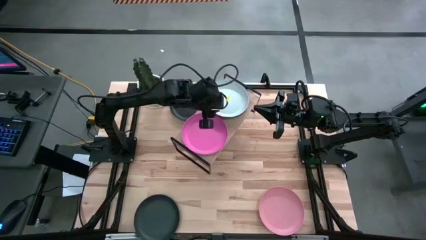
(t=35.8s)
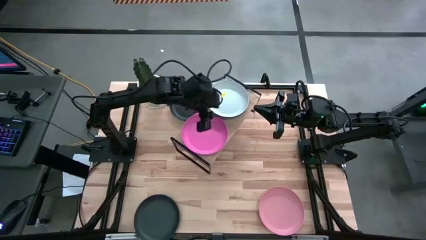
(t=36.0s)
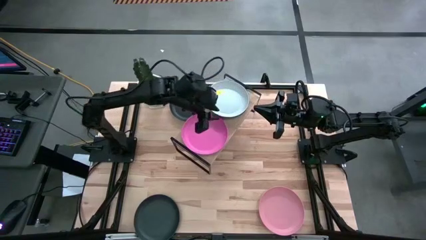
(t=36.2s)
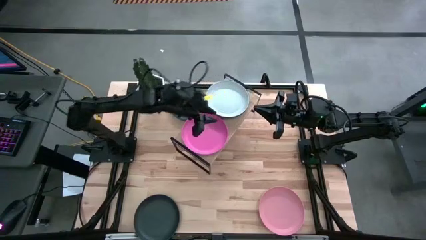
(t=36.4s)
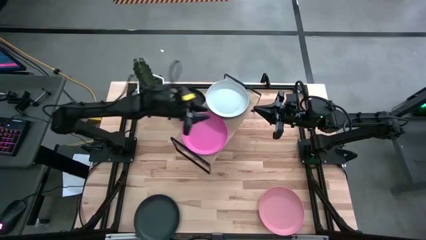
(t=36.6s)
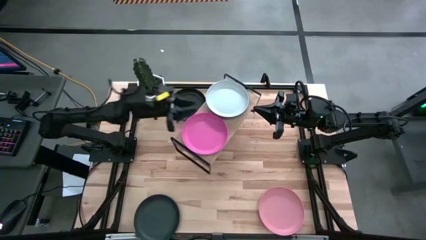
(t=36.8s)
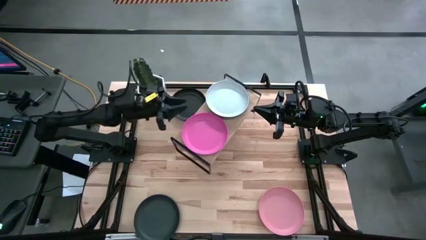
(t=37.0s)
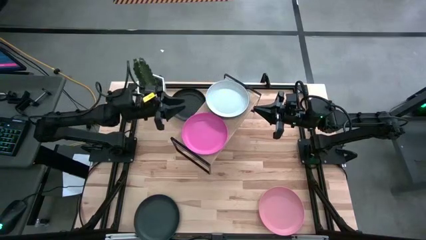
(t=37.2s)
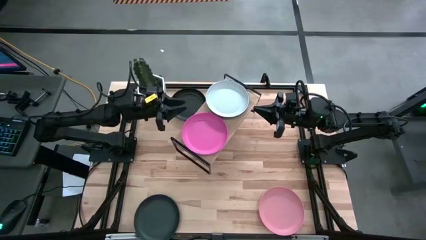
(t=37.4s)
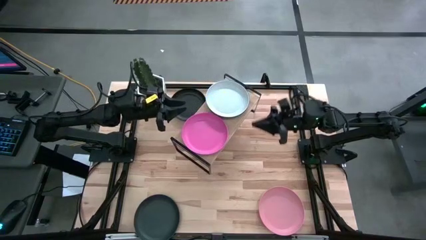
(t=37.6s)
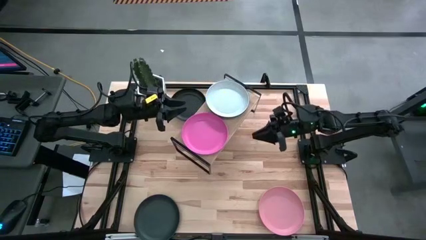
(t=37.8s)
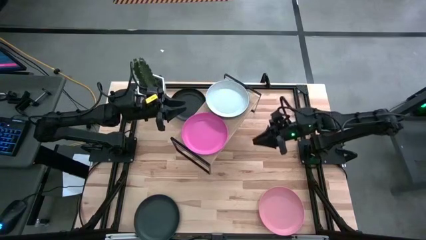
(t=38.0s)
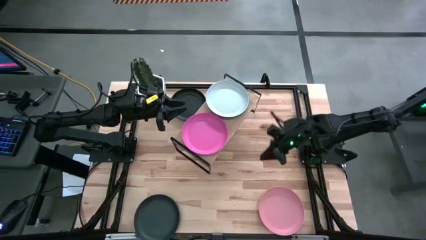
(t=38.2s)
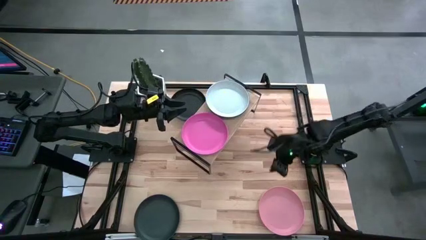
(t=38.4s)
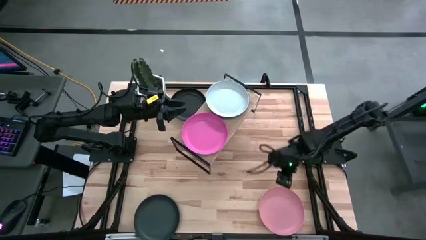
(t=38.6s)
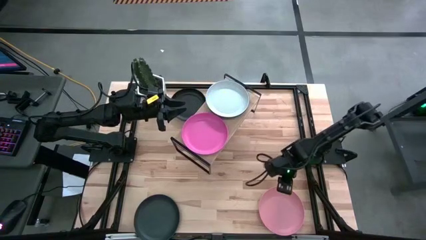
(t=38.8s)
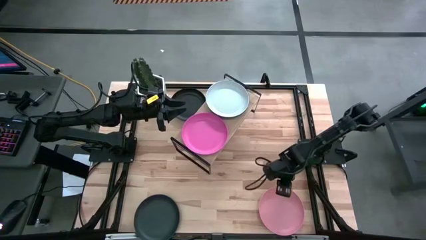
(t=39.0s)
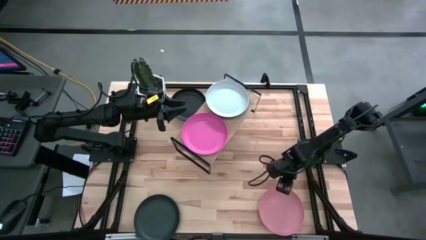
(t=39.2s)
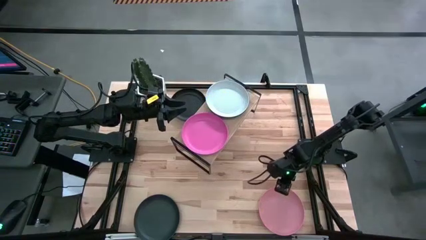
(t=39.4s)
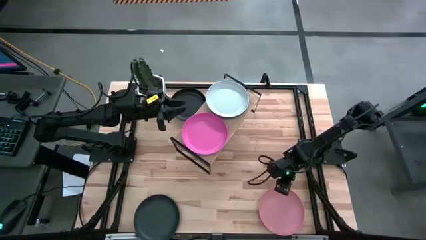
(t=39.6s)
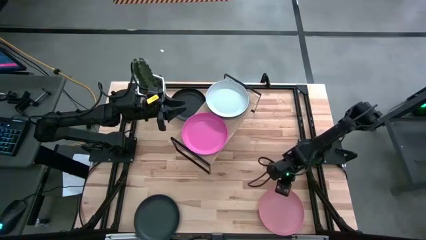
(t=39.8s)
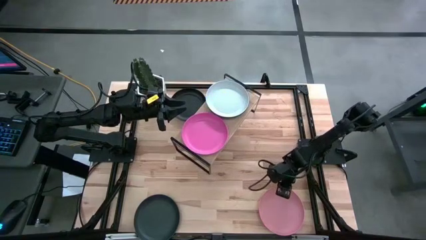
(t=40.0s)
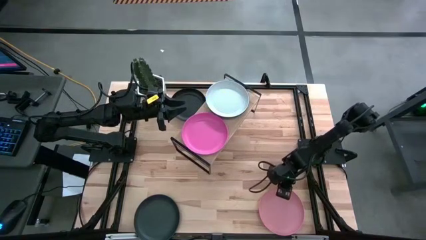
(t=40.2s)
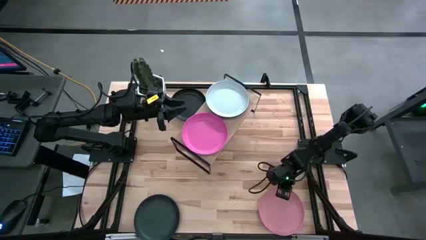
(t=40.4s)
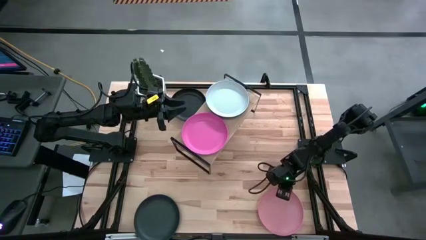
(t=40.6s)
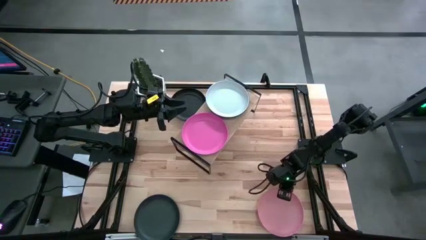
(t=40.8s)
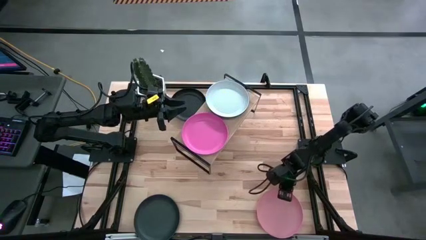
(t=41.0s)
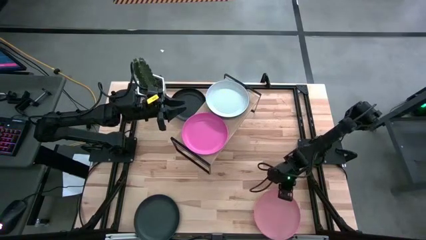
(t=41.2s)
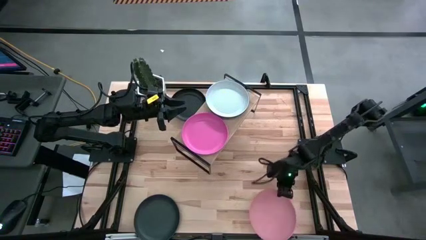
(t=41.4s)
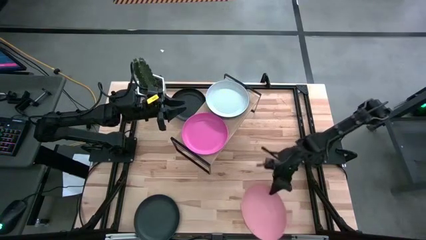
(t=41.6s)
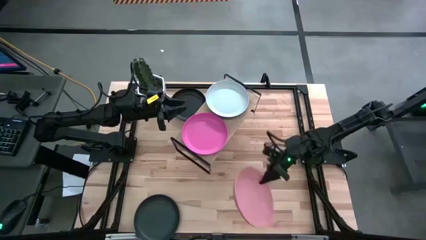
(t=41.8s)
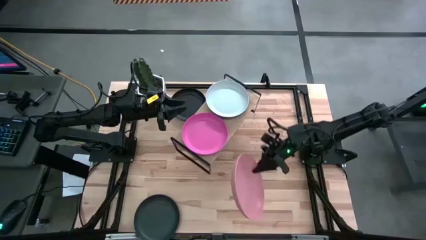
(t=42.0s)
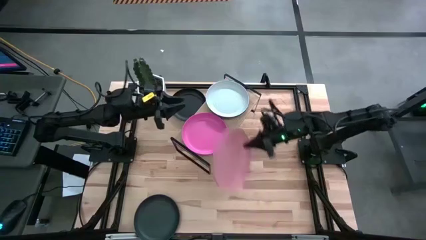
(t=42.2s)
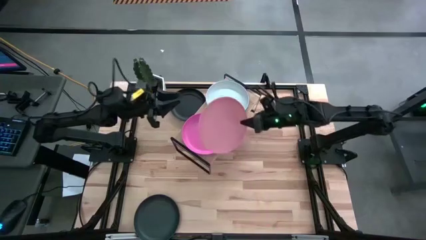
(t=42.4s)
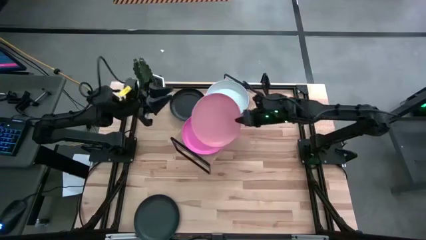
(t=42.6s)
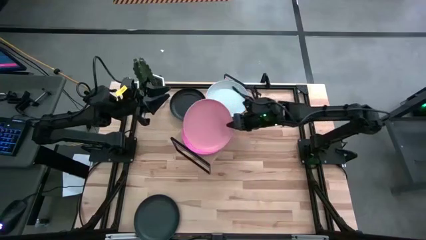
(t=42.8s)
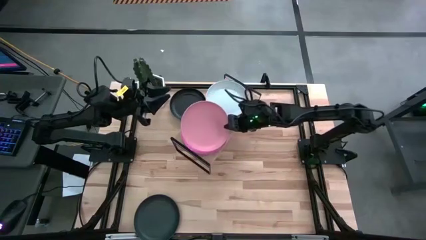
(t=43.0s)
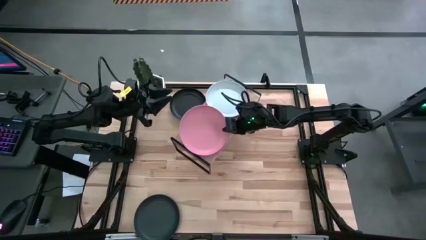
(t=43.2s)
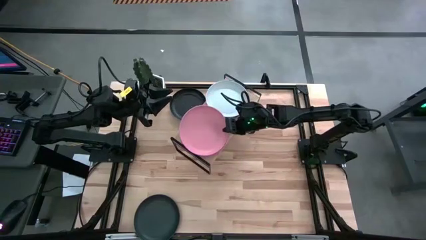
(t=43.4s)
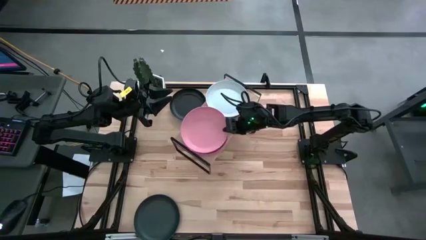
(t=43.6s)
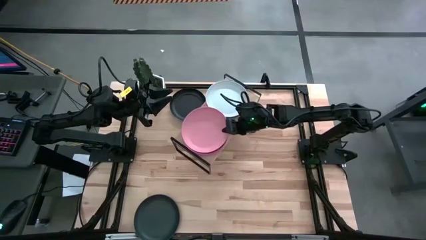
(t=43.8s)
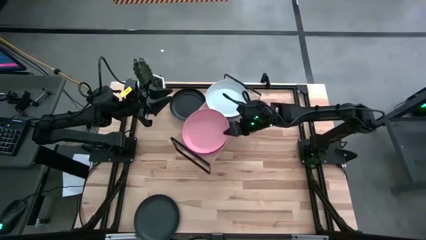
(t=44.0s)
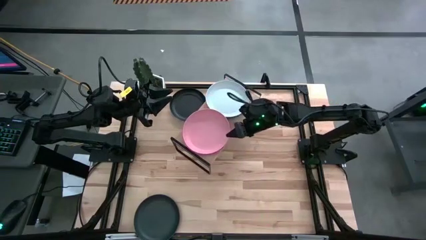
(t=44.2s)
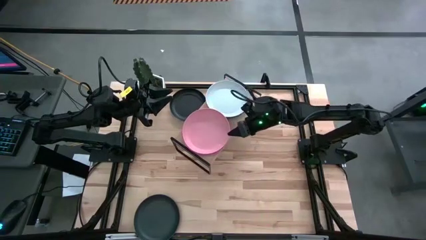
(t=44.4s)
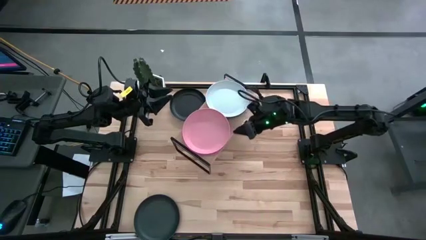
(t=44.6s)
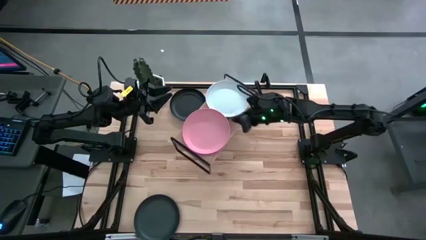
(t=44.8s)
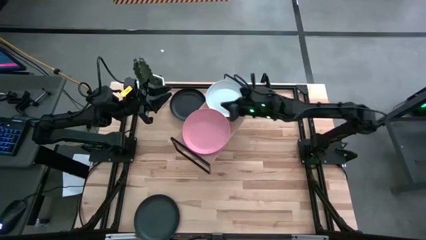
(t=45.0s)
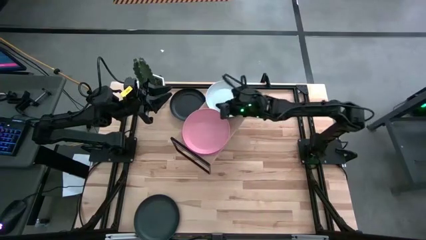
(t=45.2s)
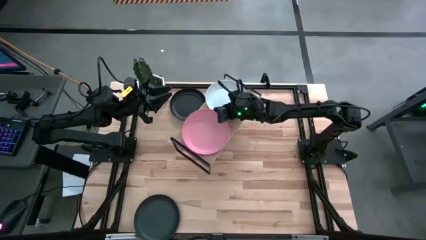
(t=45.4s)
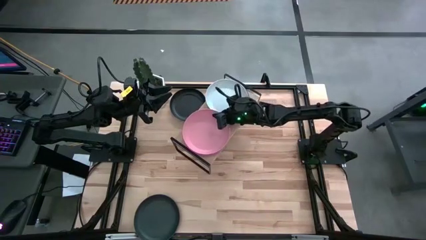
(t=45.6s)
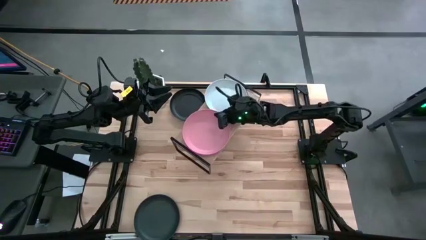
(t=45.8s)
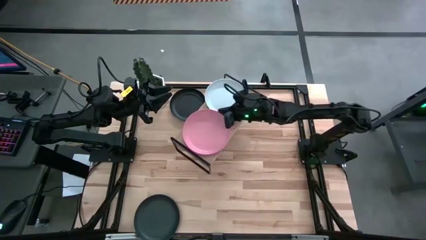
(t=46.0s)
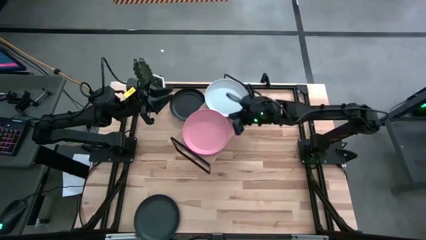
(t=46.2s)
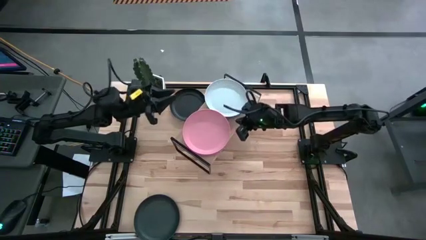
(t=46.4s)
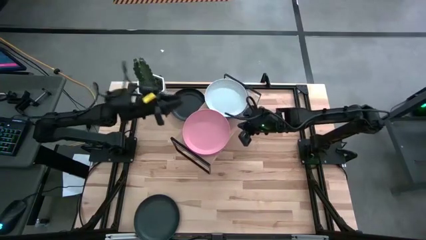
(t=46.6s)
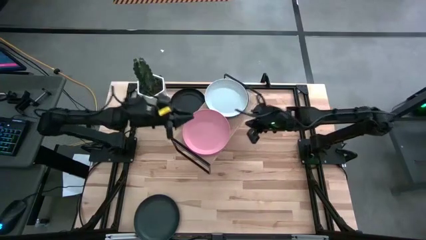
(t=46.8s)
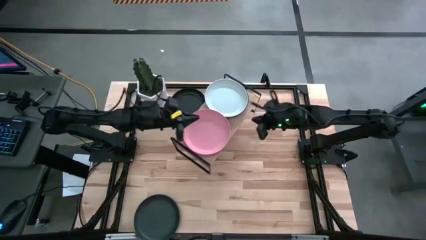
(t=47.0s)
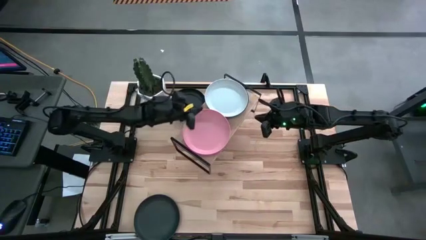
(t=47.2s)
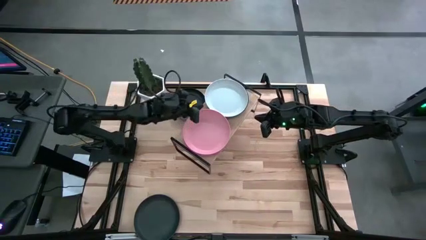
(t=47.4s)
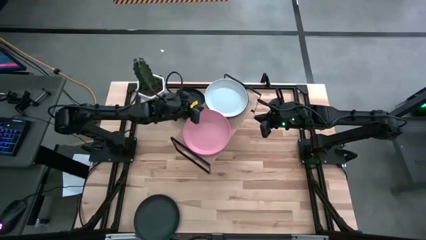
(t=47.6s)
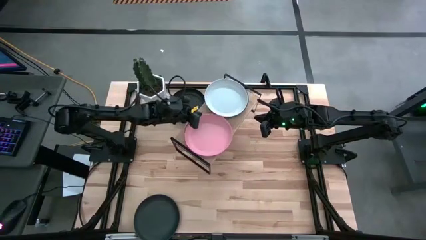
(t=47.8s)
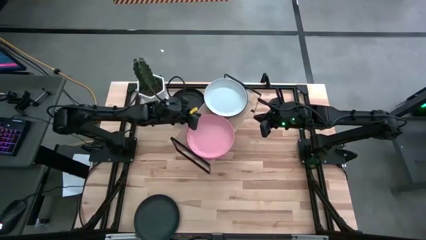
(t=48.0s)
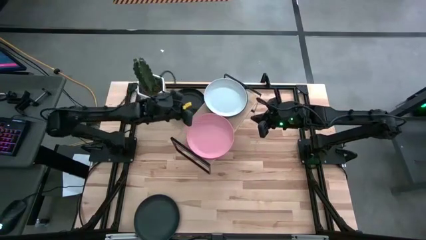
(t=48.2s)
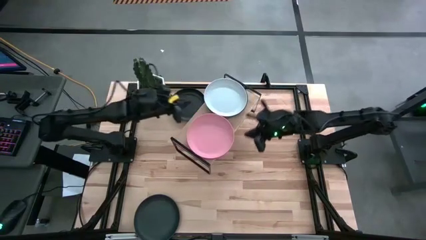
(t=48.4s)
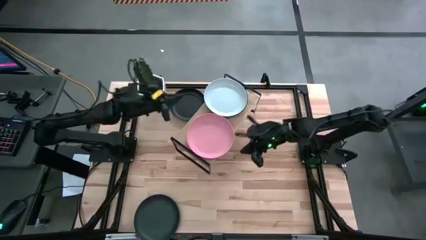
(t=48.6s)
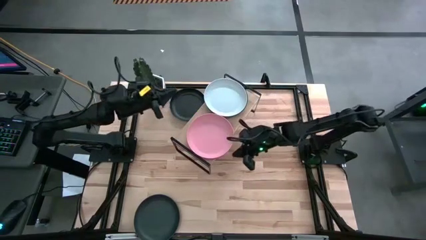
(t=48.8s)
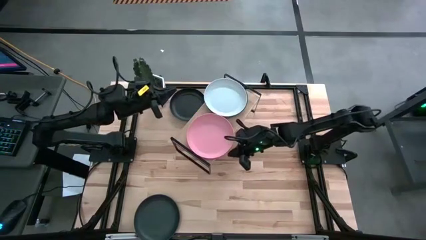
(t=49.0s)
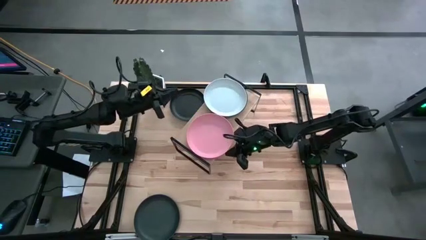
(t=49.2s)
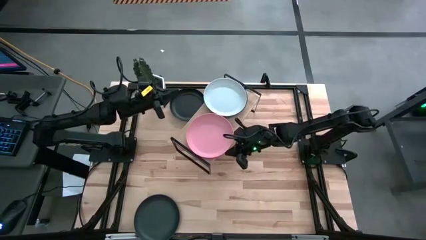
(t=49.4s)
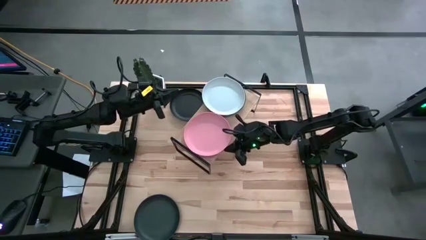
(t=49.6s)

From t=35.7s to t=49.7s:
Task: Place and stack plates onto a shelf
Stack the light pink plate on top of the pink plate on the shelf

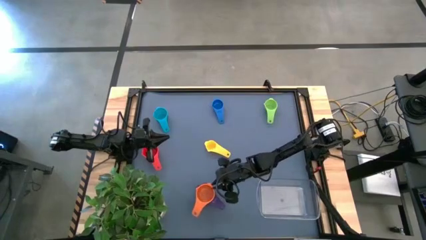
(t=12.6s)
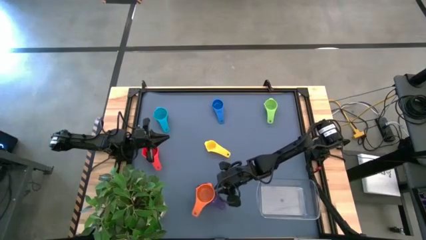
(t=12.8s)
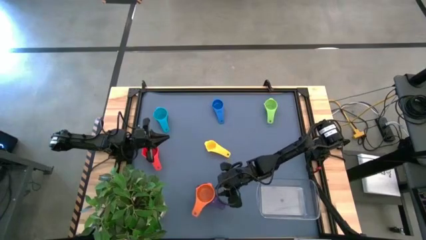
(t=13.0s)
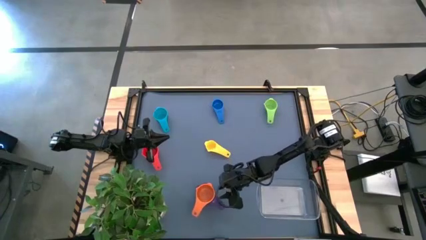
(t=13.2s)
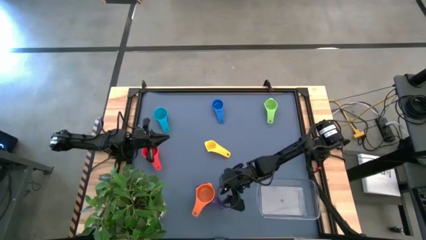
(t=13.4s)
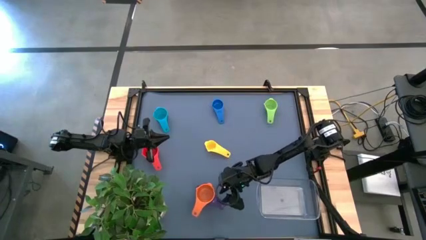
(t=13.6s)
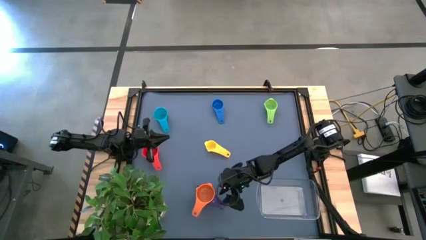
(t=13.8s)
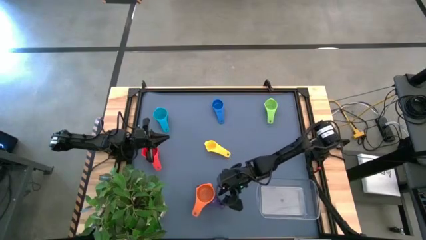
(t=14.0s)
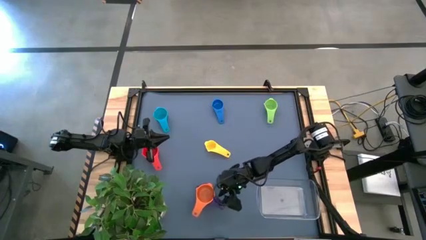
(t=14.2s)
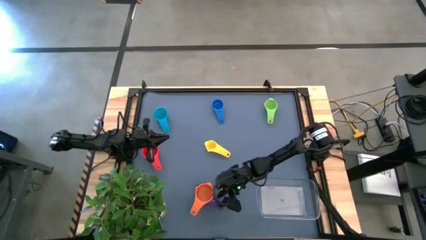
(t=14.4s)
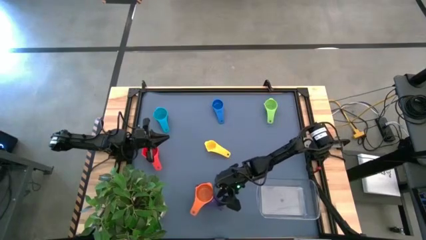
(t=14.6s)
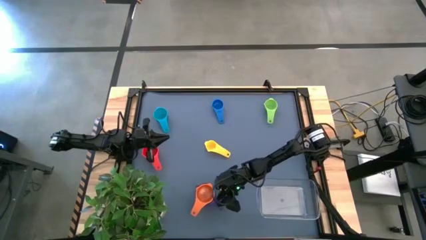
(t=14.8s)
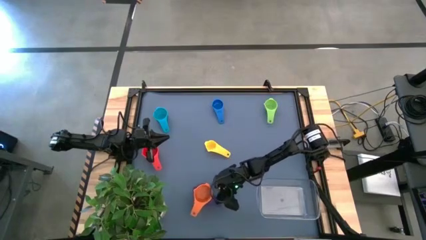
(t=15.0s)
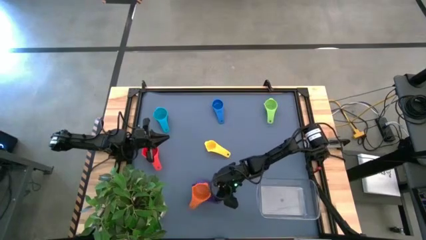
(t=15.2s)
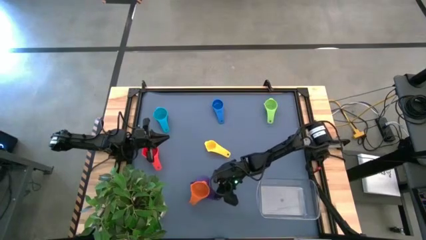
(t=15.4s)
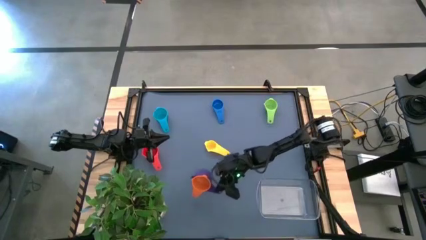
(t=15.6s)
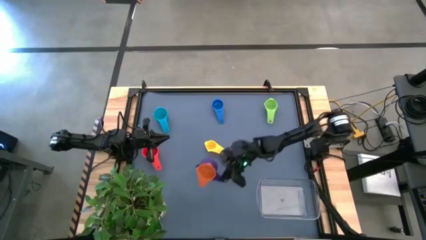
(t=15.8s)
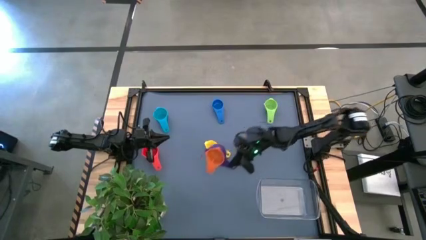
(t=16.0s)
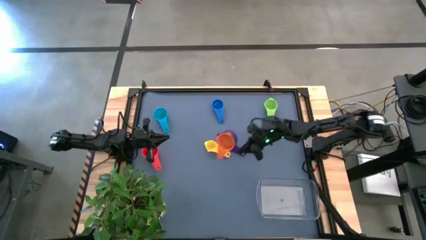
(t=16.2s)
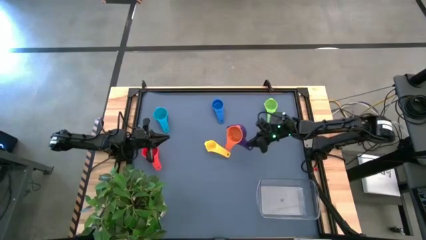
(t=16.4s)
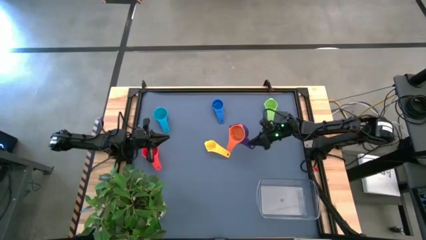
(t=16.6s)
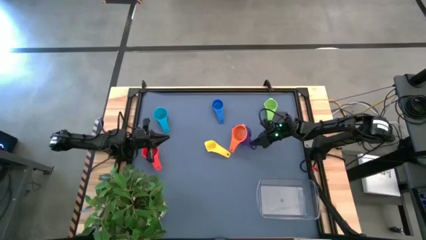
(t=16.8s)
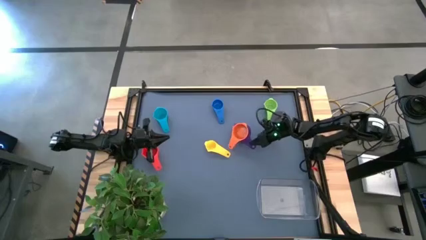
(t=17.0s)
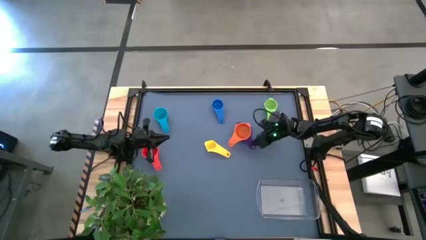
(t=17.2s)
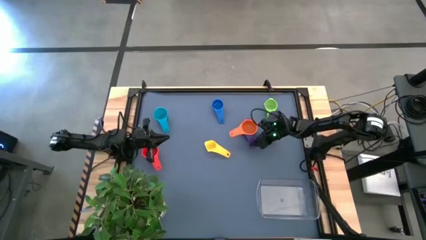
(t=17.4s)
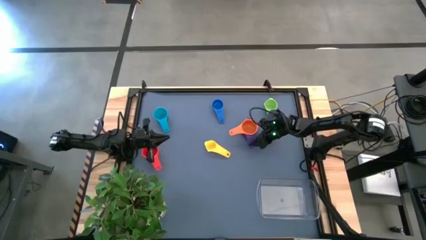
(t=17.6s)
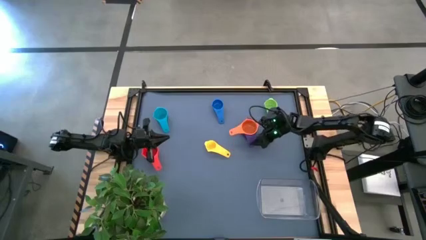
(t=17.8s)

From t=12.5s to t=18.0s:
Task: Nest measuring cups in basket
Move the stacked measuring cups to the top middle of the table
